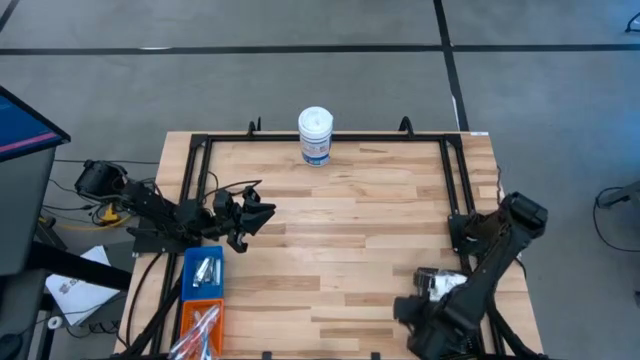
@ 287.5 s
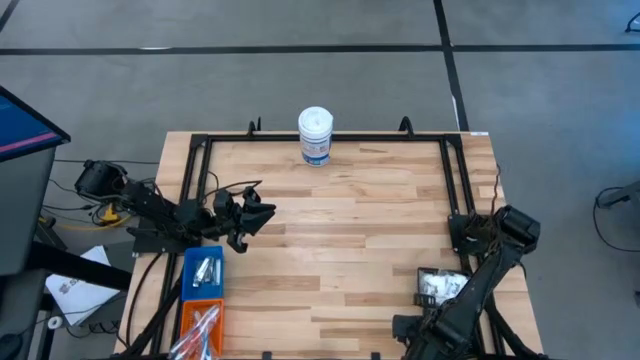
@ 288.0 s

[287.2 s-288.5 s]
Task: Pick & Place Travel size toiletries
Adjust the bottom black bin

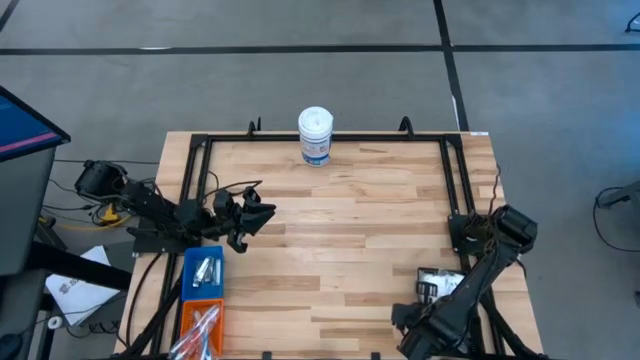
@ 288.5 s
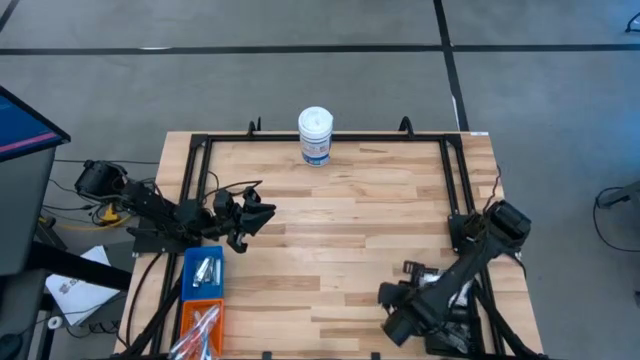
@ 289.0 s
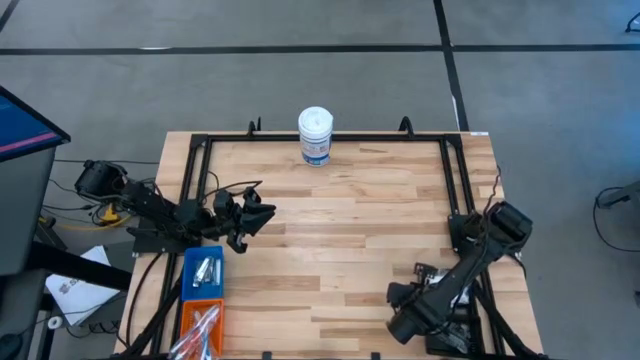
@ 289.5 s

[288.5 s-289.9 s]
Adjust the top black bin

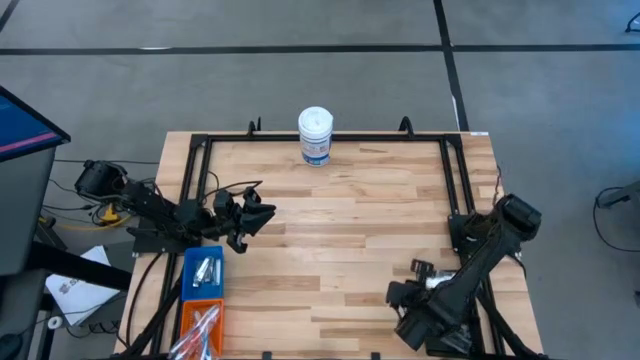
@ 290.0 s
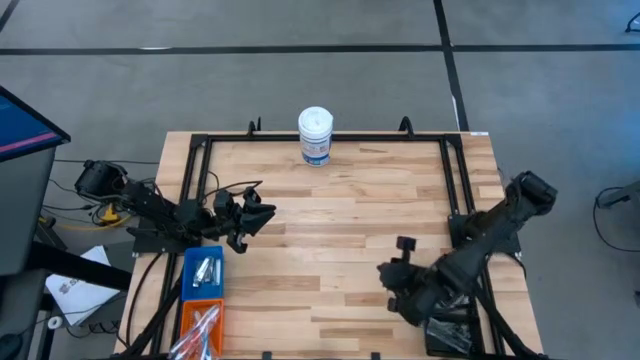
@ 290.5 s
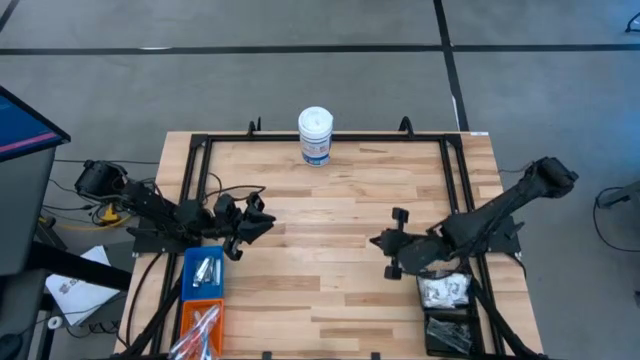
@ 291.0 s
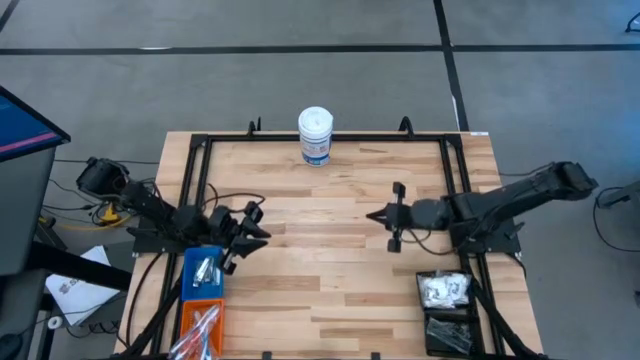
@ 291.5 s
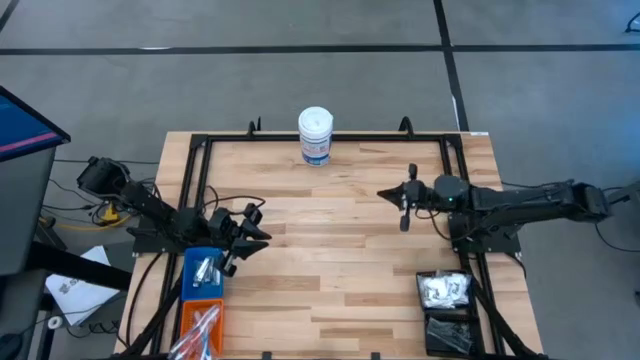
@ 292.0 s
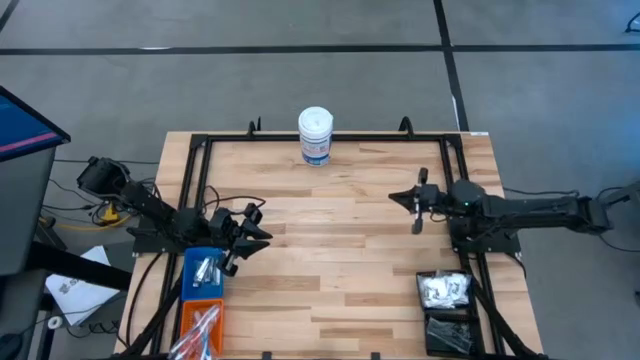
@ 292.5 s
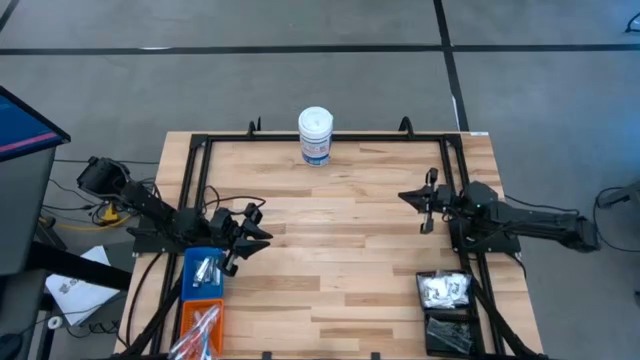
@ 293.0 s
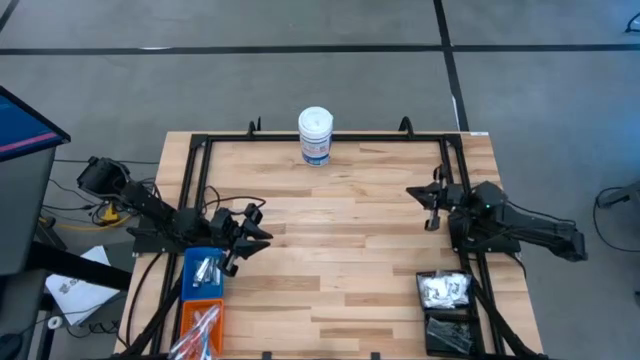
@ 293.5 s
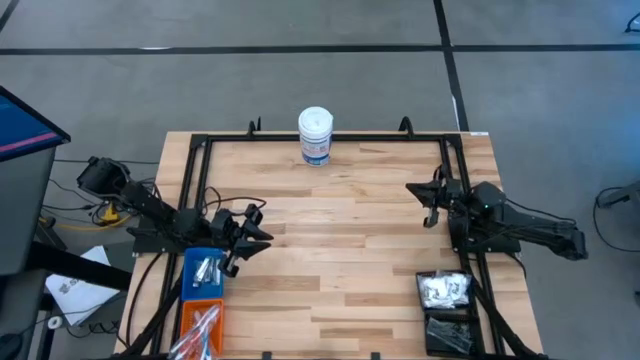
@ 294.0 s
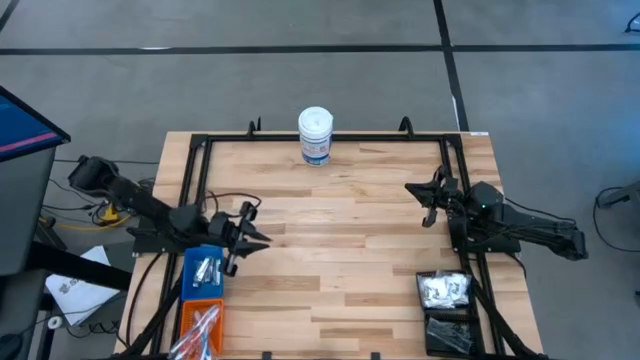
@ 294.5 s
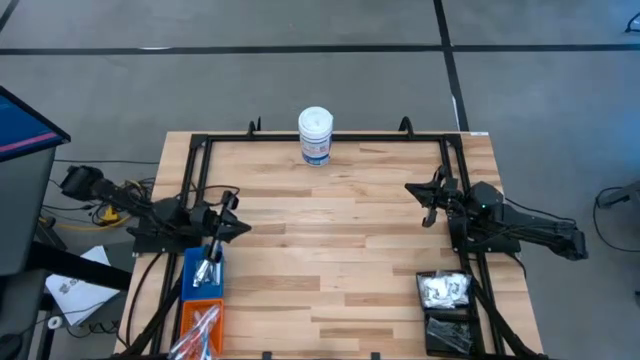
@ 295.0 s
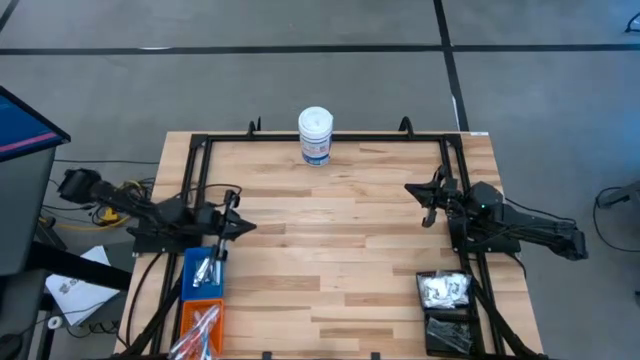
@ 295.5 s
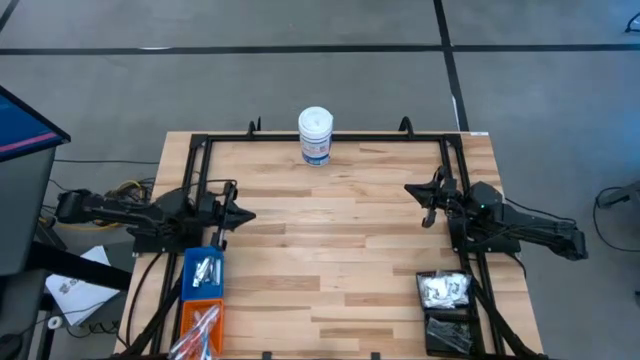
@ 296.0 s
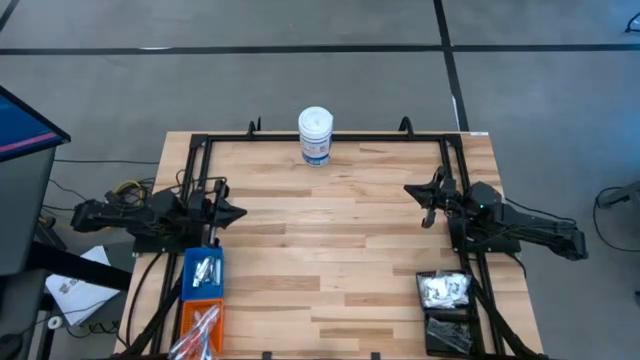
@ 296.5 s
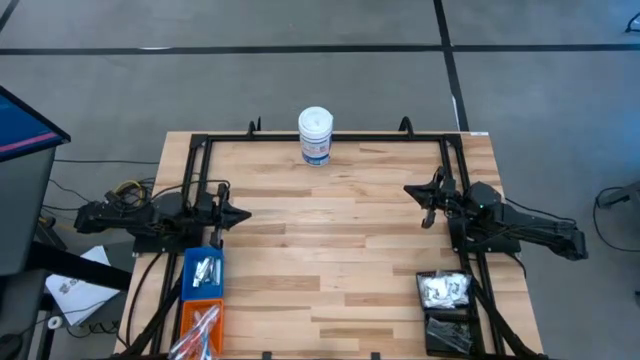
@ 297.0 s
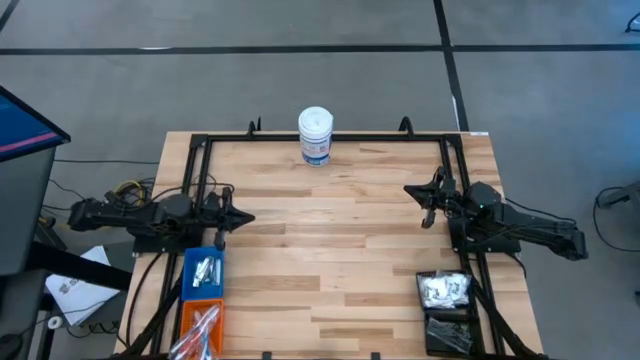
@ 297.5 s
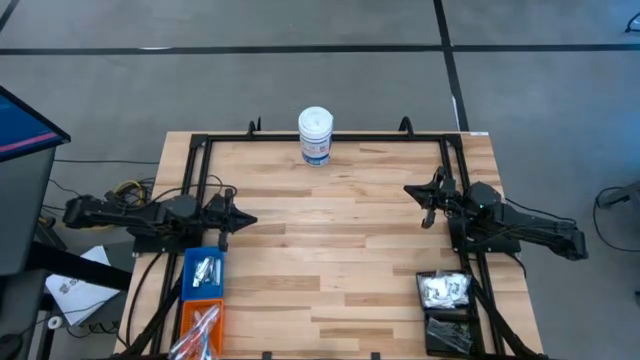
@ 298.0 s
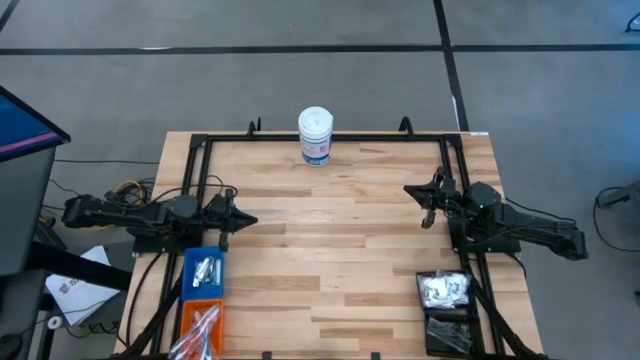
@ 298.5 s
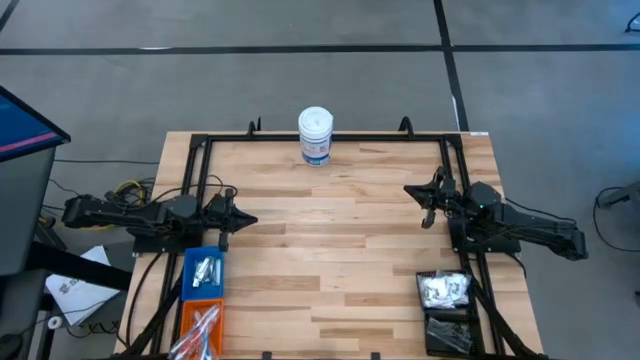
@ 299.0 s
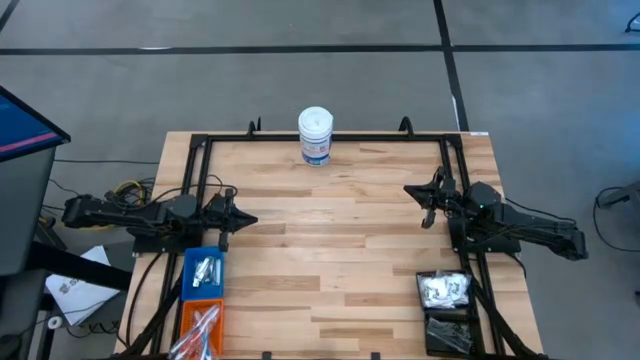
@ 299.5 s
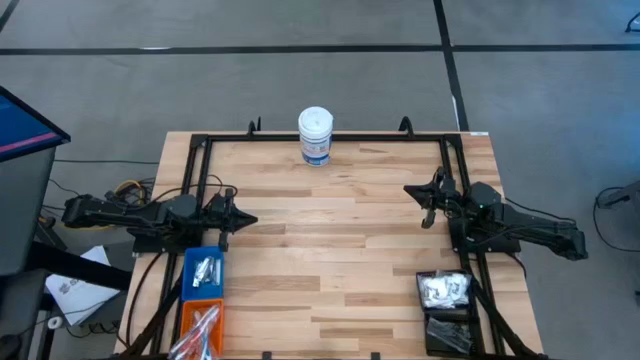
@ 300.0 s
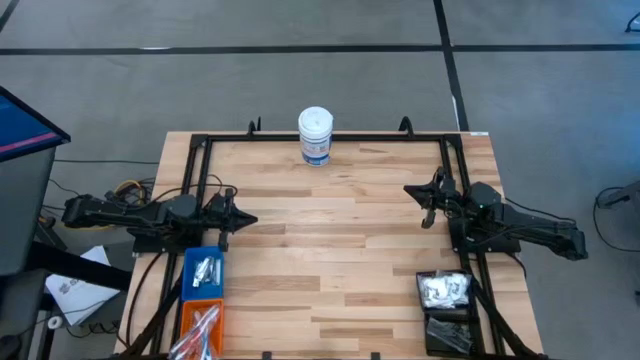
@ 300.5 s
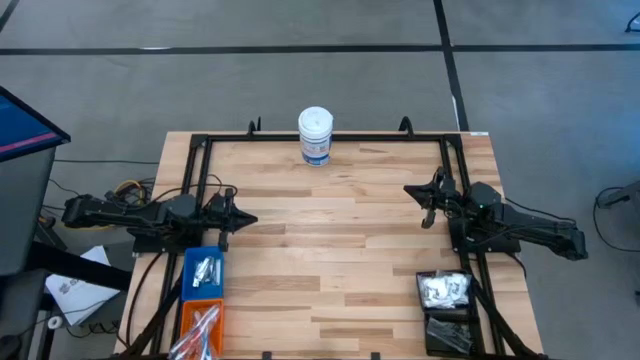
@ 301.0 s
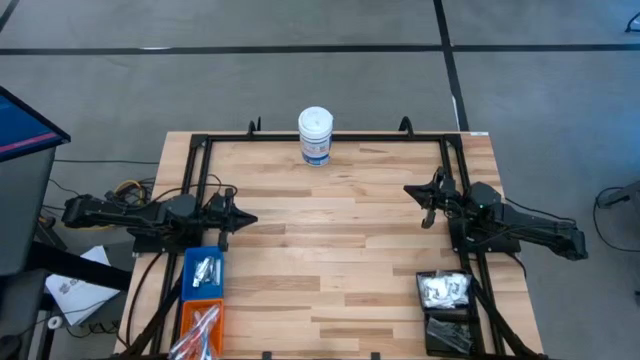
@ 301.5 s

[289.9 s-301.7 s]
Return to Home Position

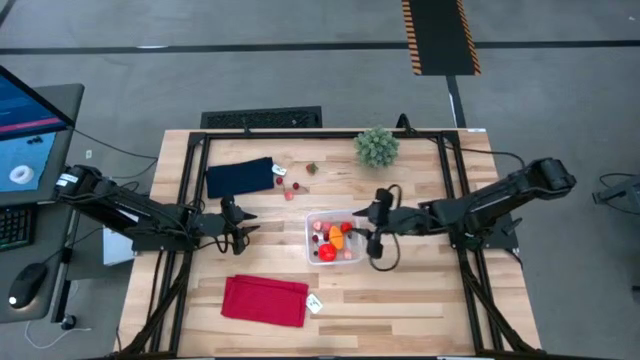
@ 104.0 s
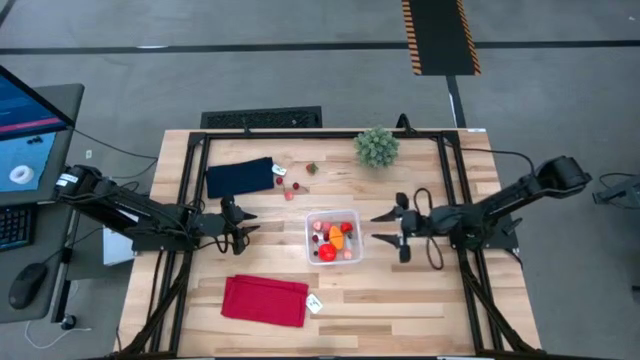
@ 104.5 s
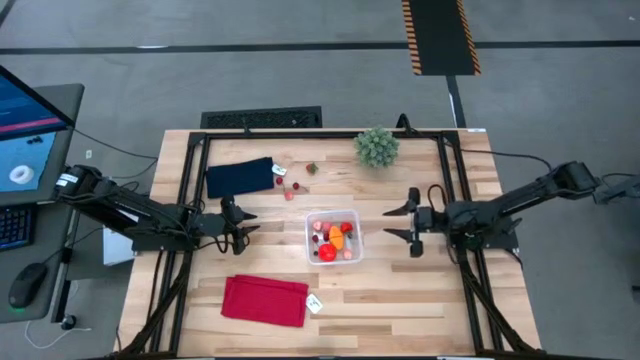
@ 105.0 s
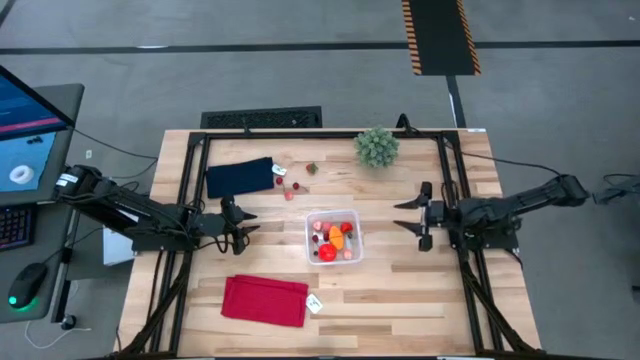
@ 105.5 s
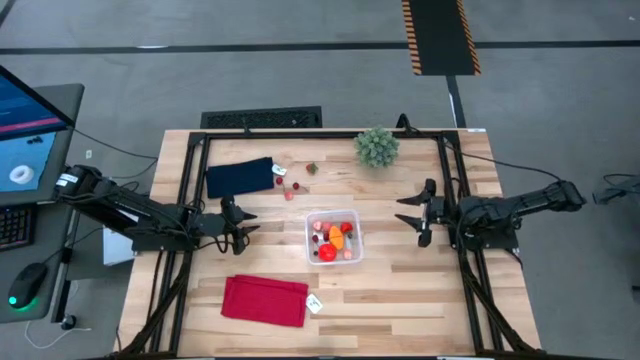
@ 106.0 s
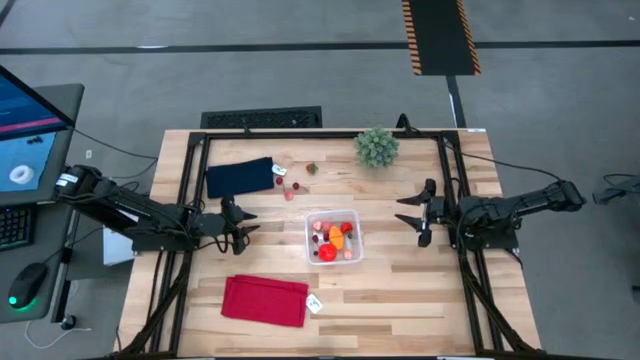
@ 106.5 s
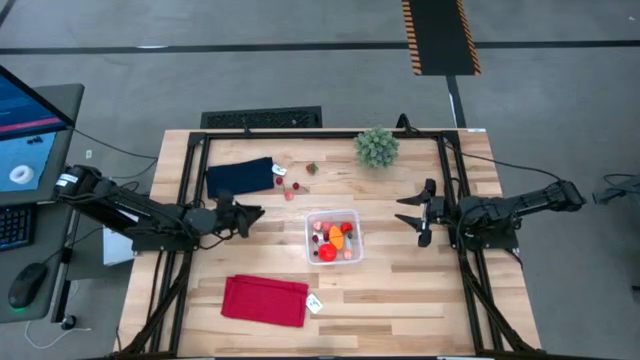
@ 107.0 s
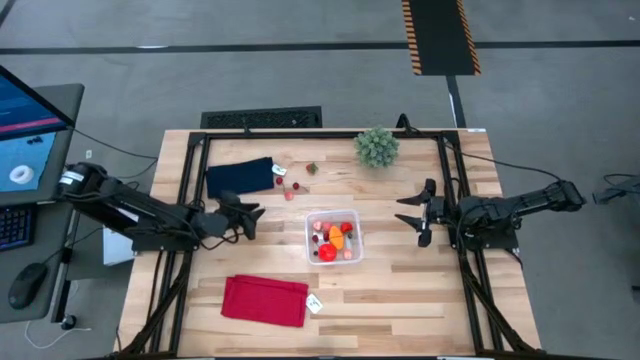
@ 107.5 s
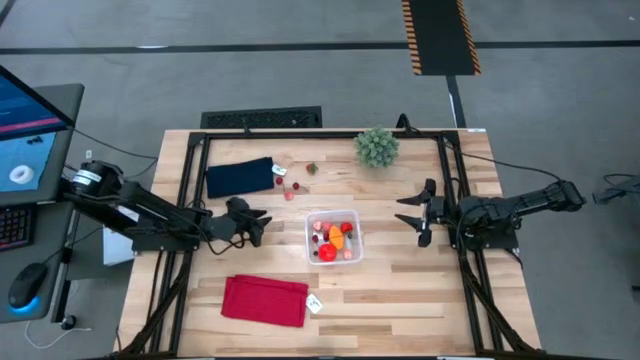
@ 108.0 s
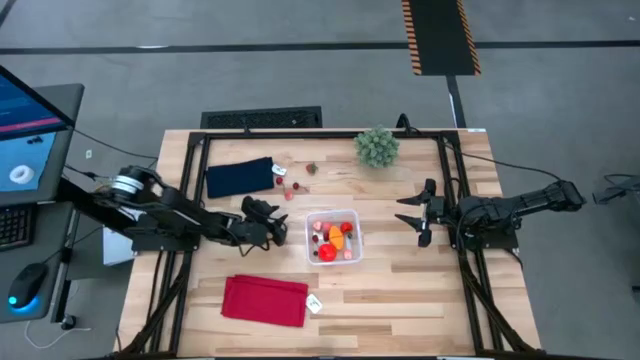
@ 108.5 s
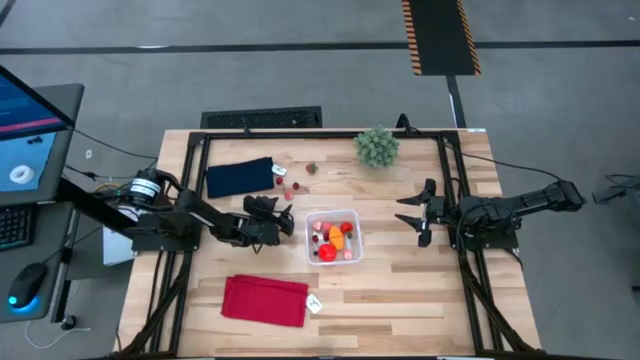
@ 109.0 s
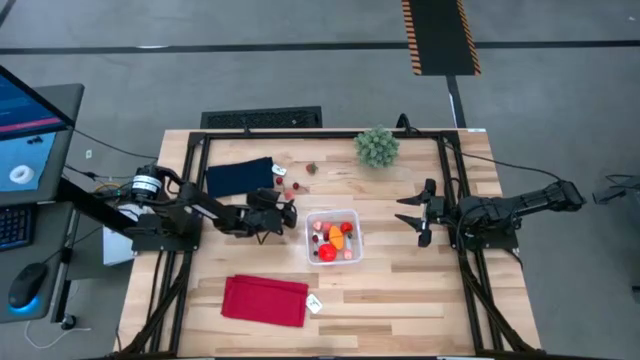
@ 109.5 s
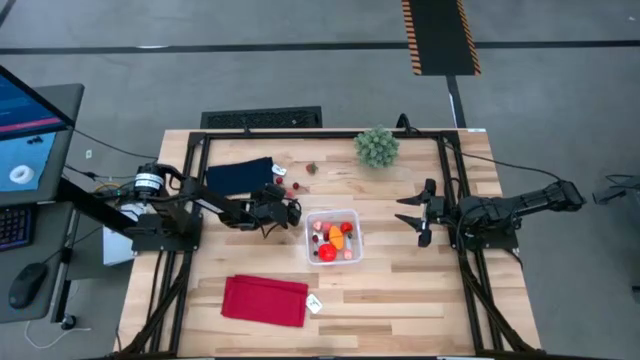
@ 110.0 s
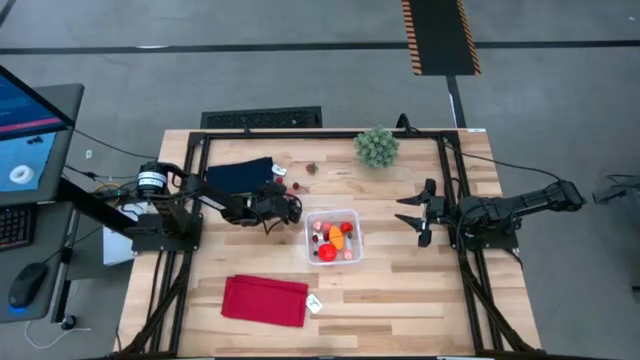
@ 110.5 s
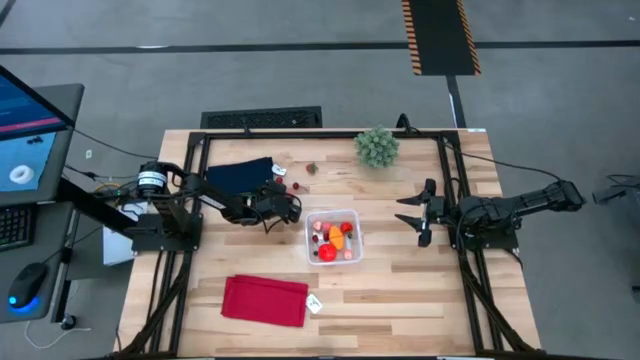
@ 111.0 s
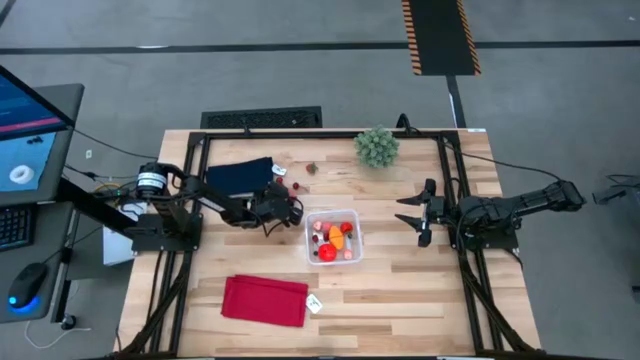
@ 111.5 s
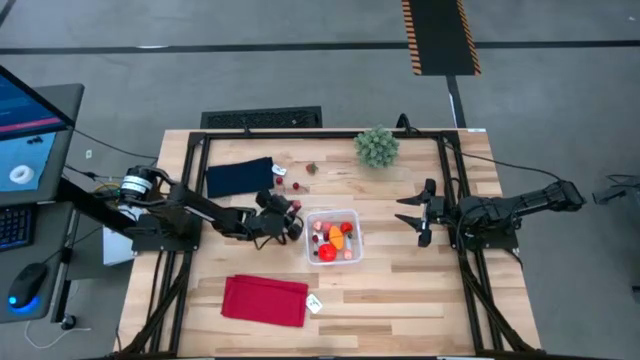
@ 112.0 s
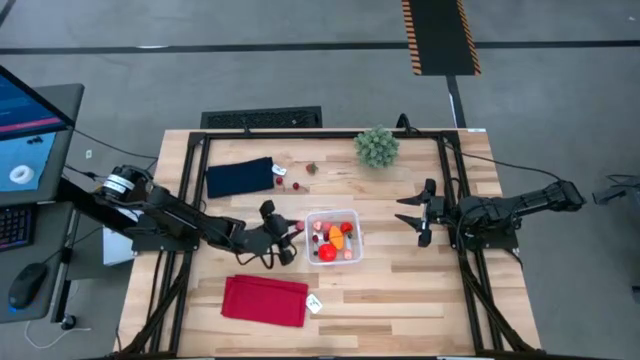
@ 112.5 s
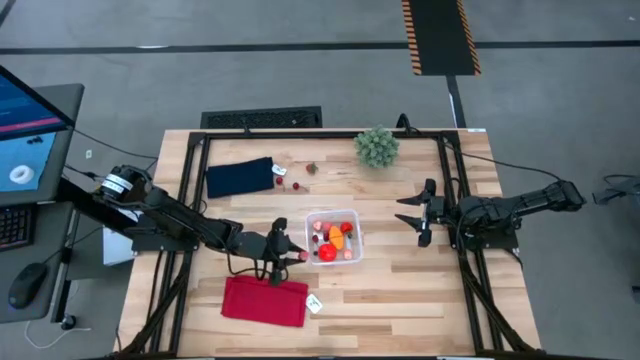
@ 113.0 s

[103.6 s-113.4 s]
Task: Pick and placing Produce into tupperware
Put the pink peach into the transparent bin
